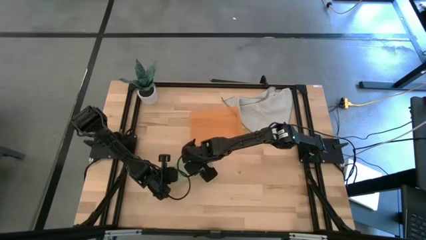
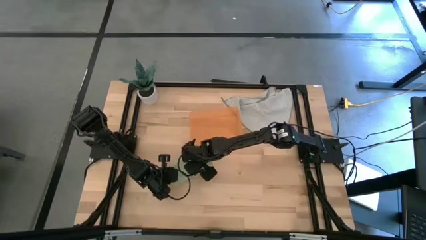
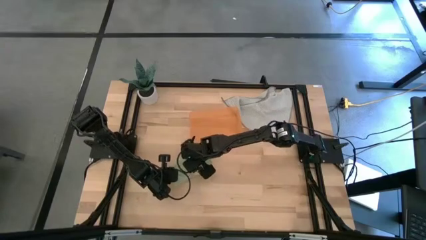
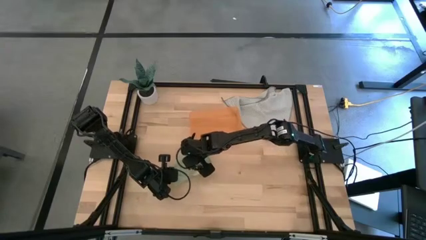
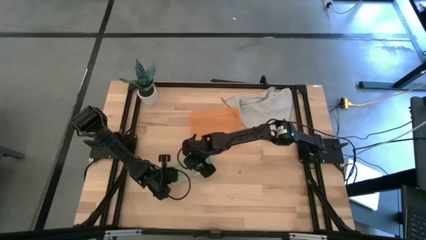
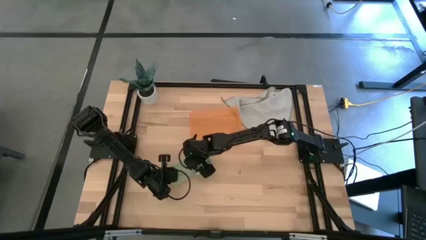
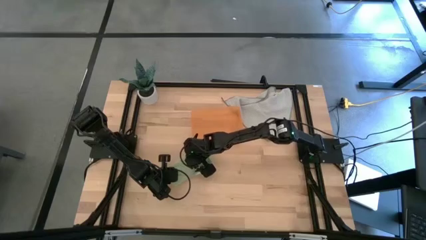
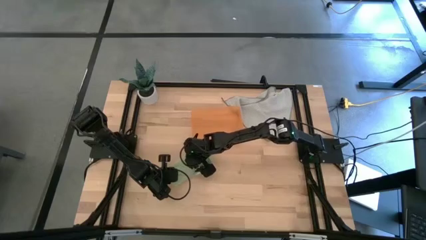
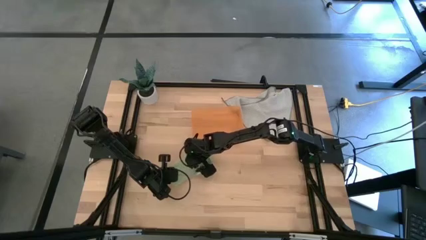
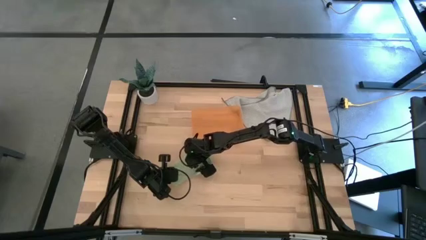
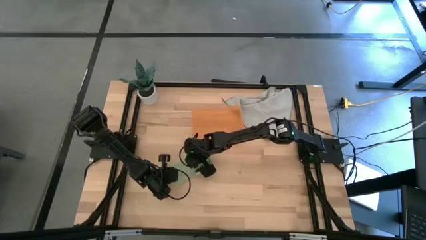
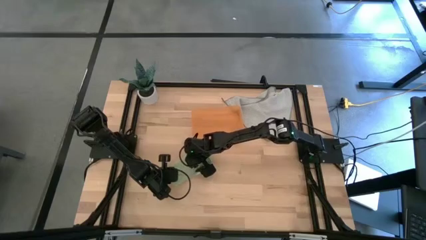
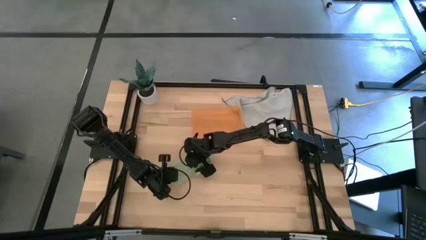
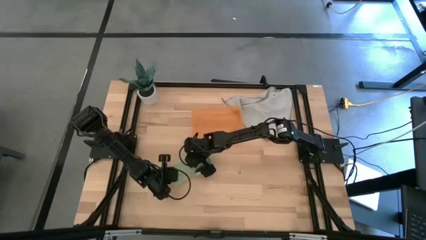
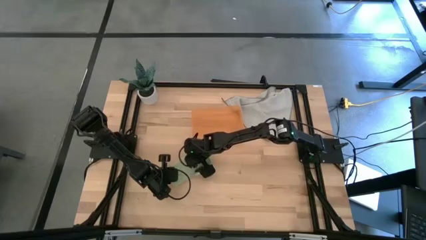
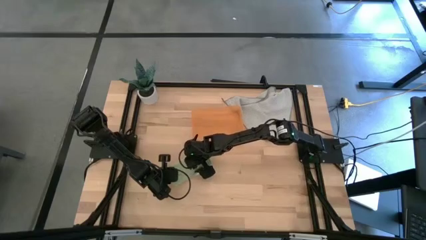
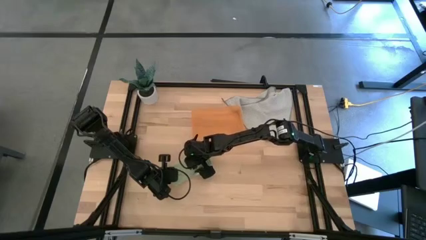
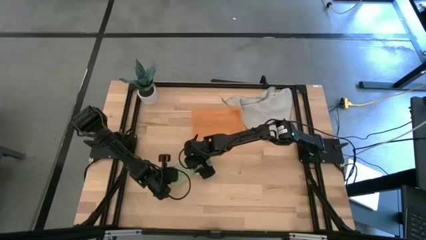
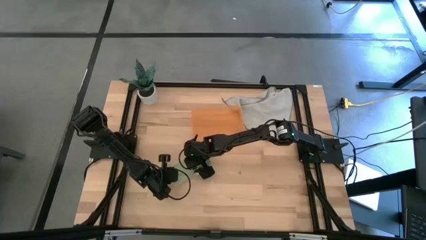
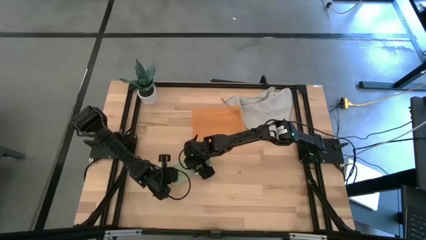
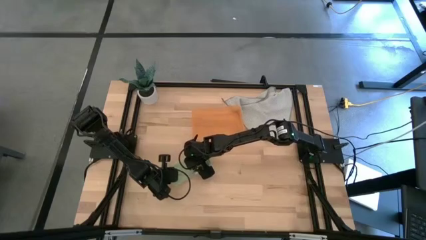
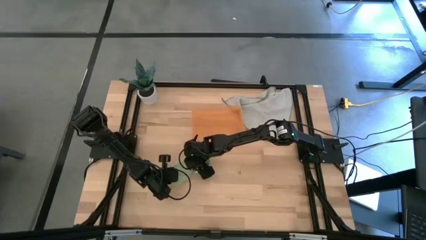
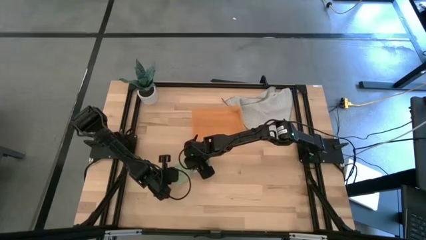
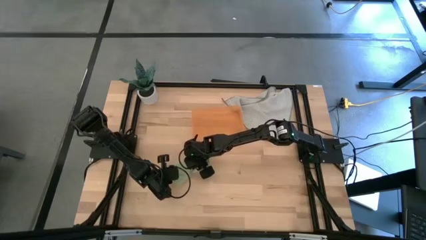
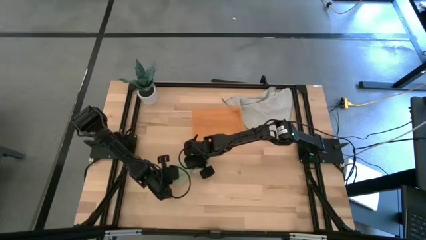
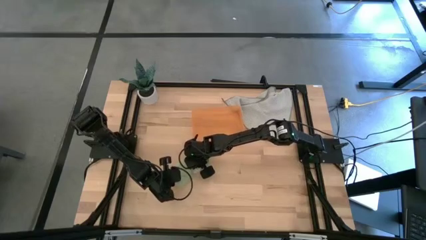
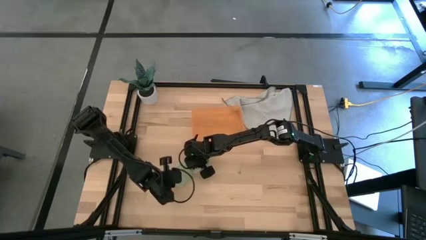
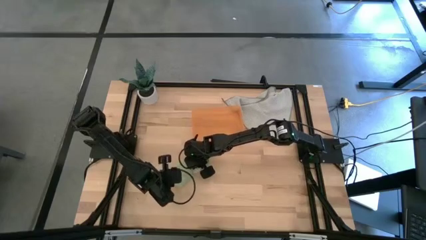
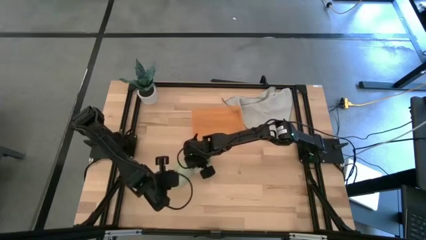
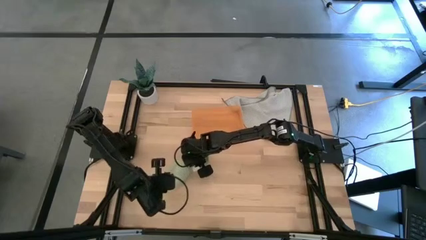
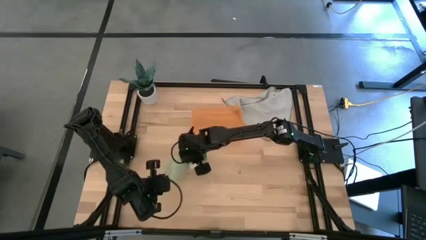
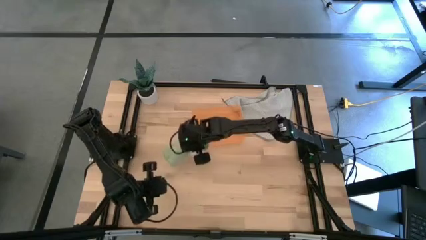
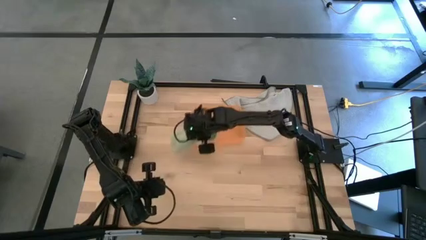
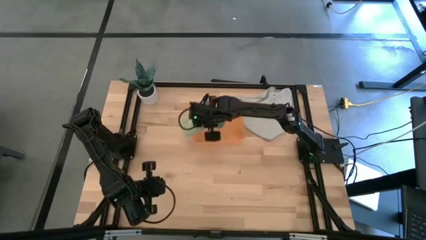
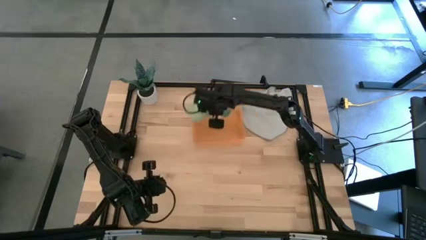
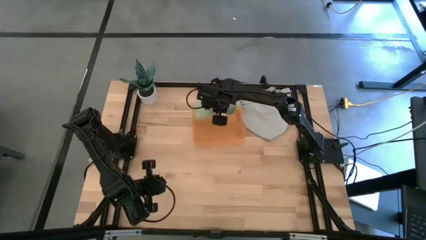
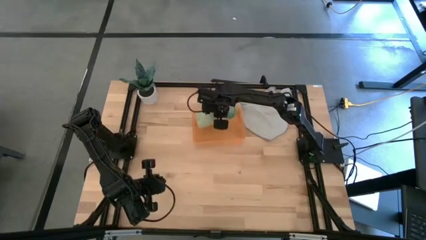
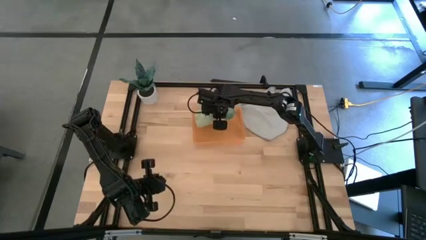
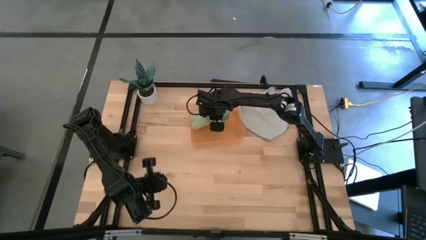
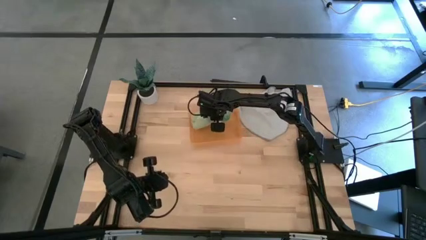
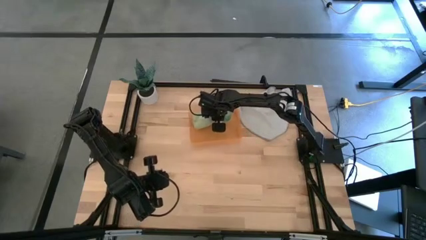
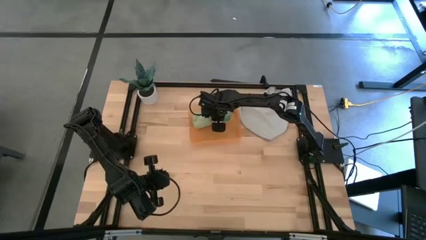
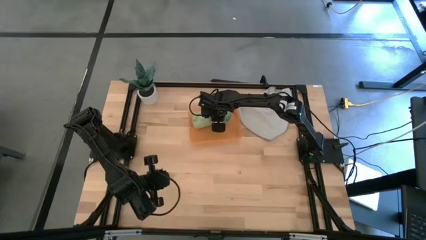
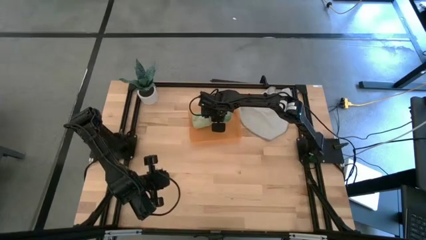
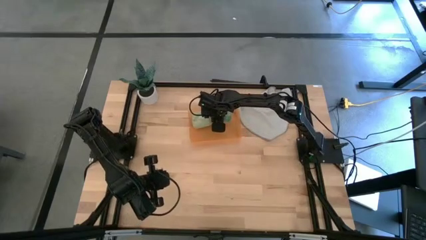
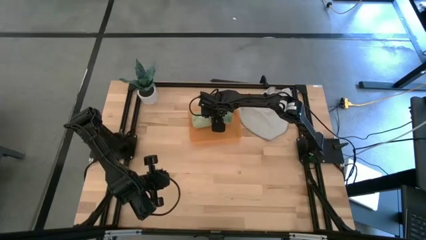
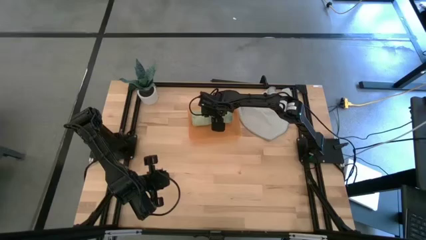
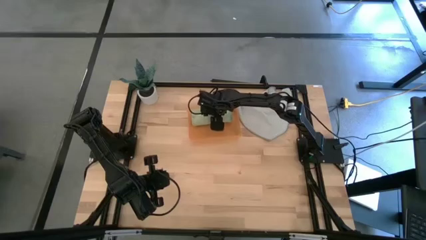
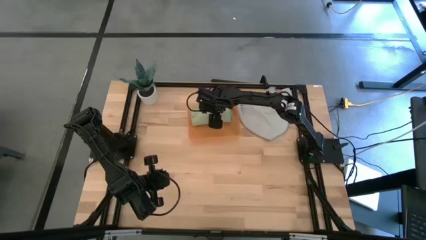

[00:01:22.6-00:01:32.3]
Task: Roll microfiber towels into tight, uniform cylinder then place into a basket
Put the green microfiber towel into the orange bin

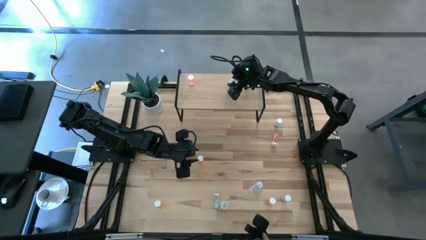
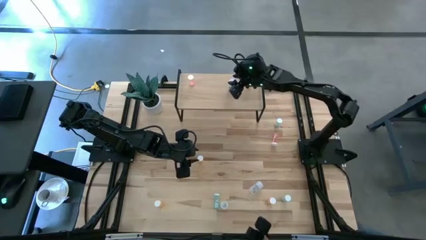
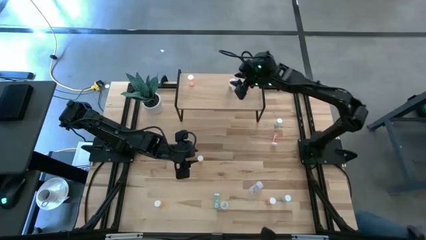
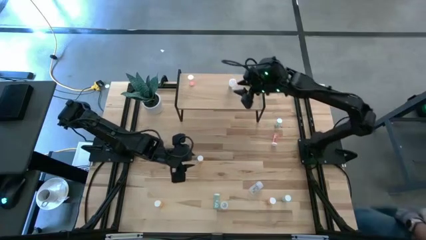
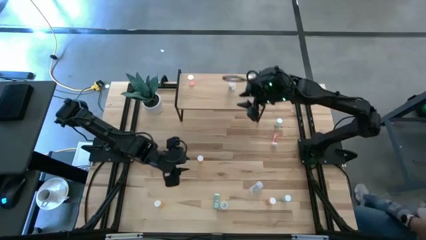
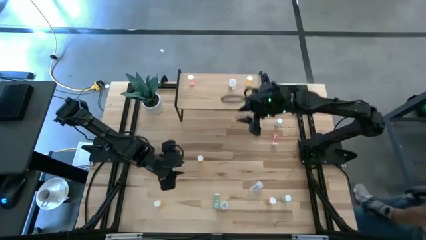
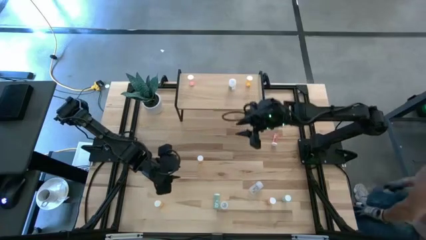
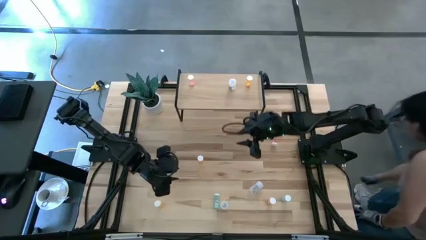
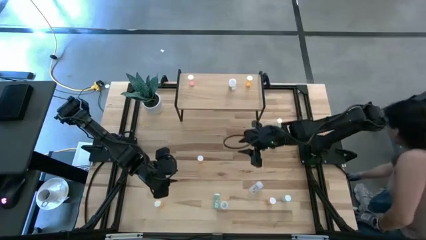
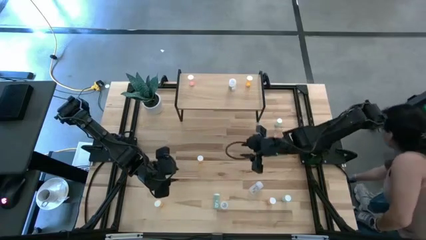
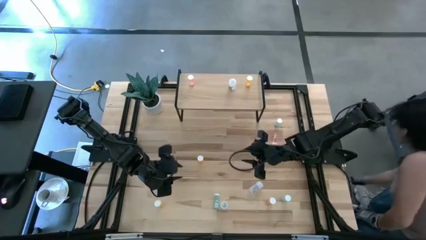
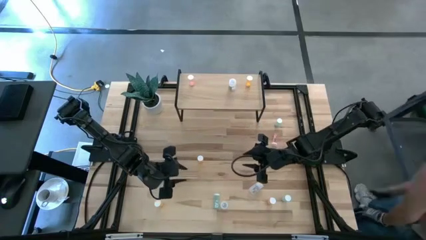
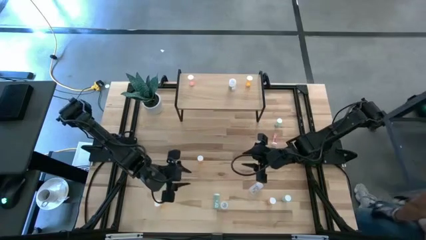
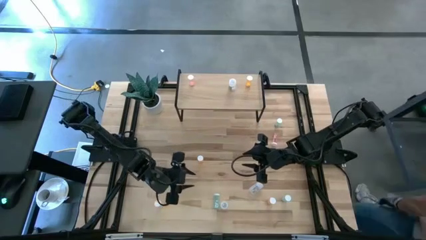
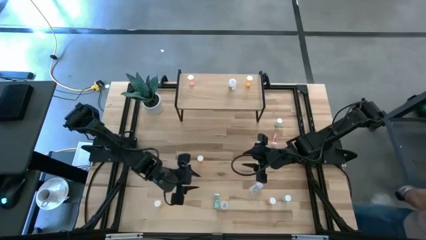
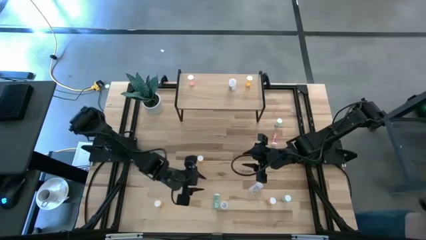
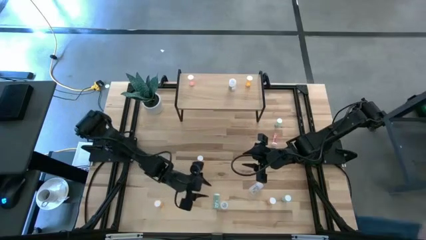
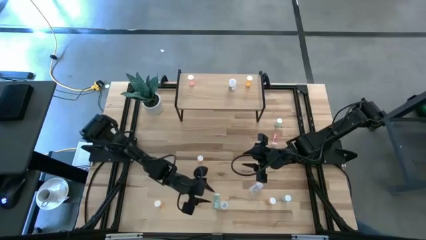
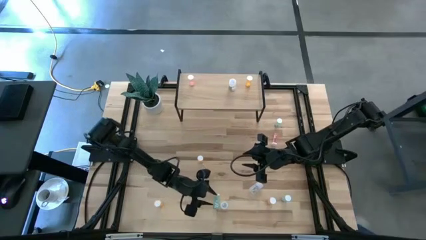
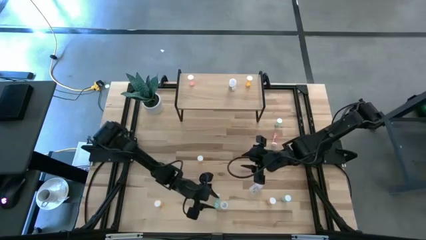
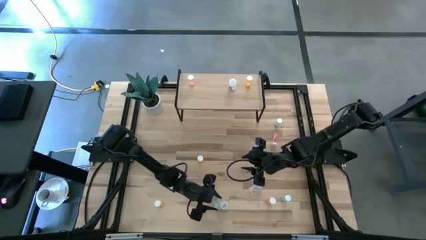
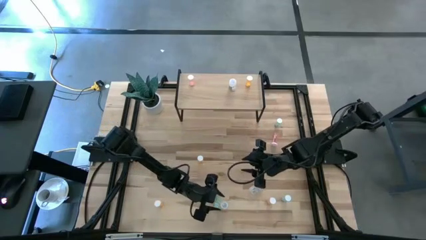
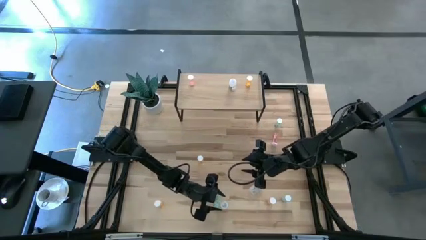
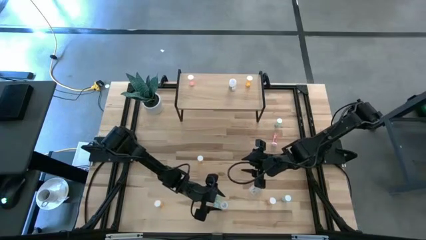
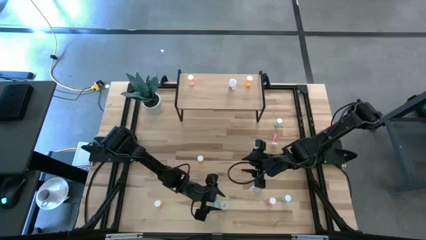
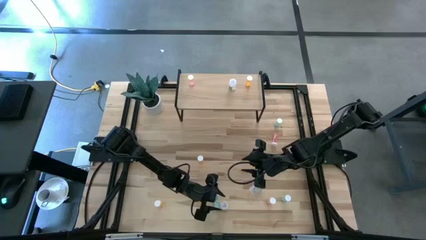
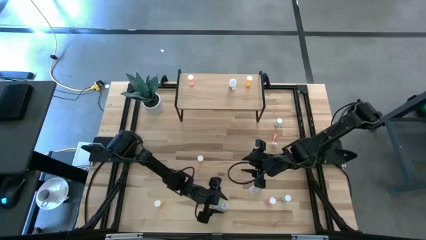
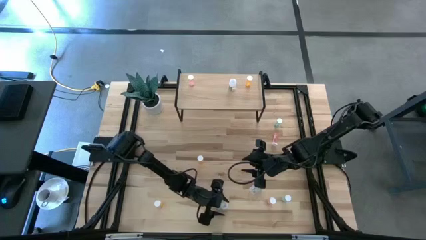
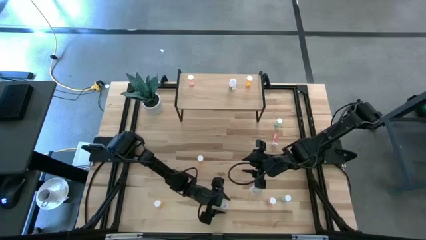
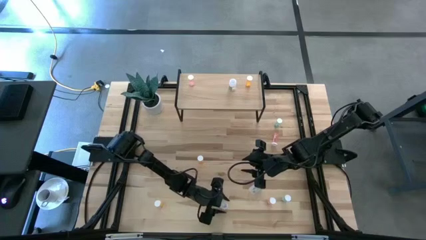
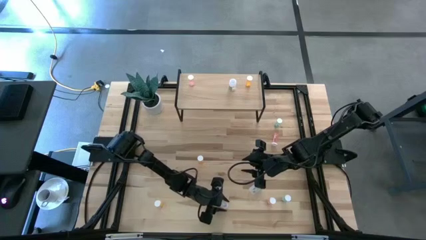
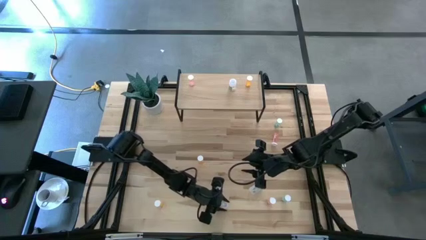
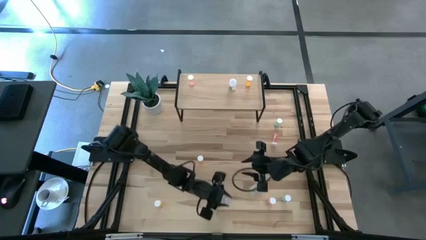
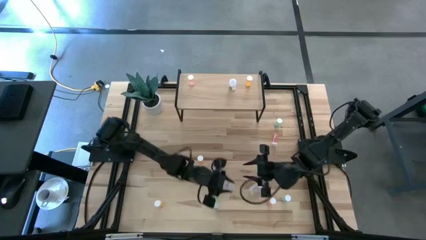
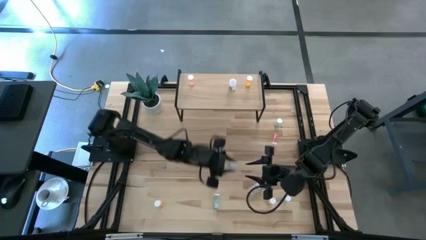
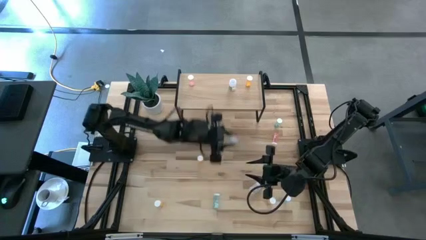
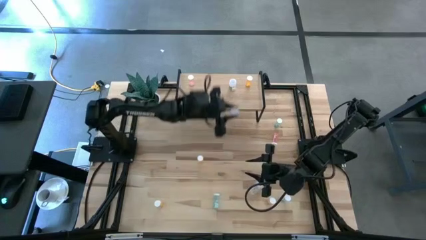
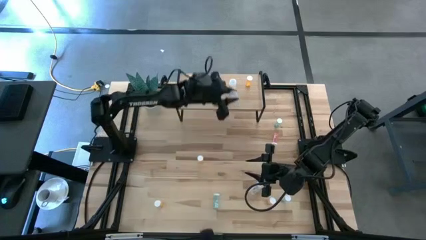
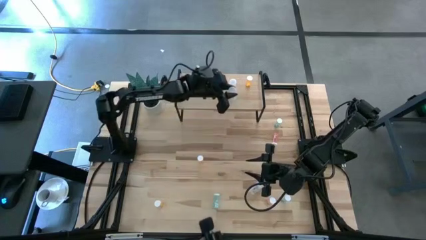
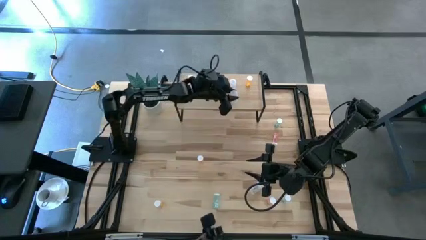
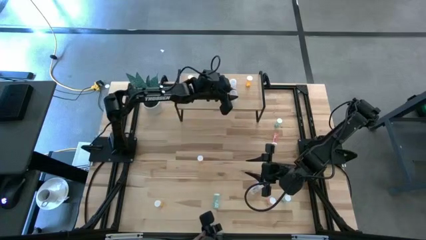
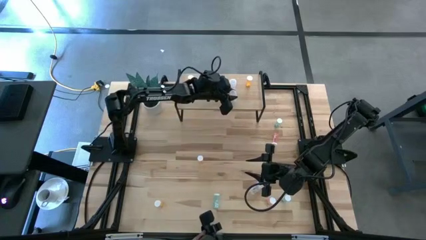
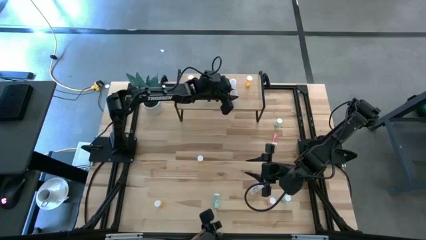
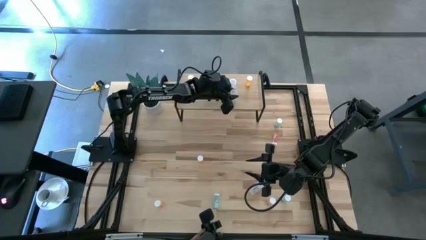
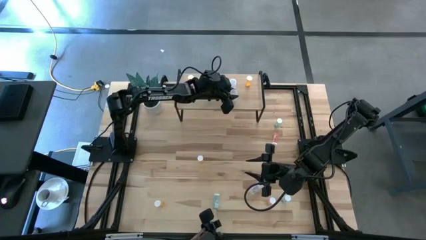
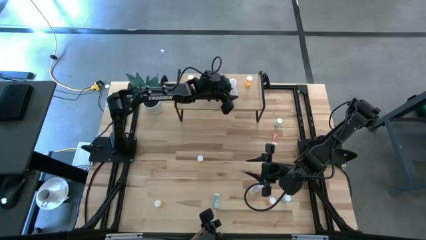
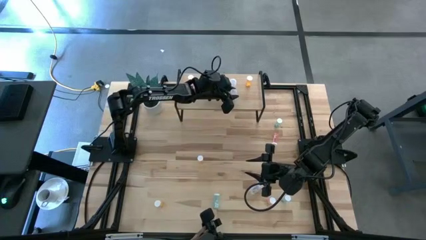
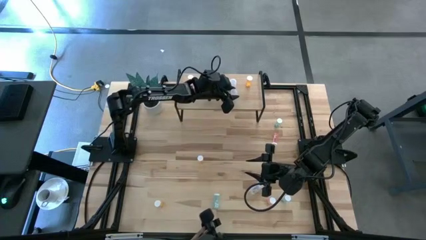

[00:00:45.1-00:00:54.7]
Task: Pick and place medicine bottles onto shelf by color
Put the bottom transparent pill bottle aligned with the other transparent pill bottle on the shelf
